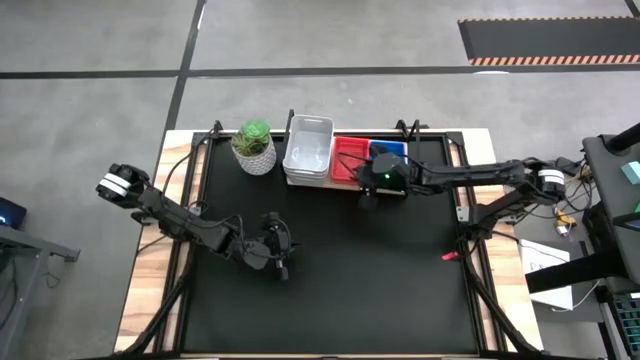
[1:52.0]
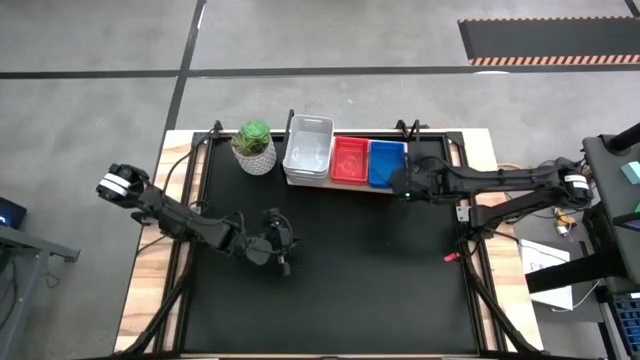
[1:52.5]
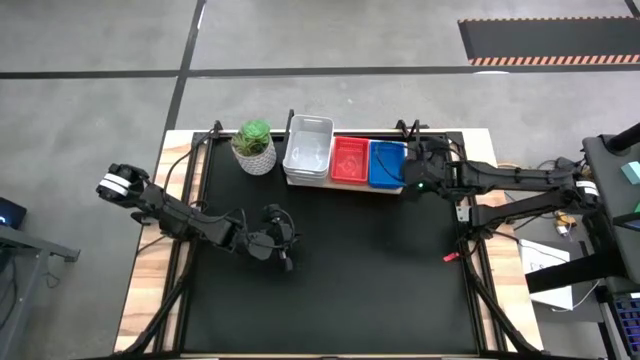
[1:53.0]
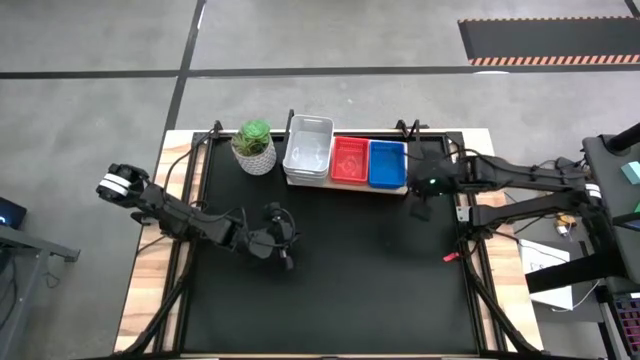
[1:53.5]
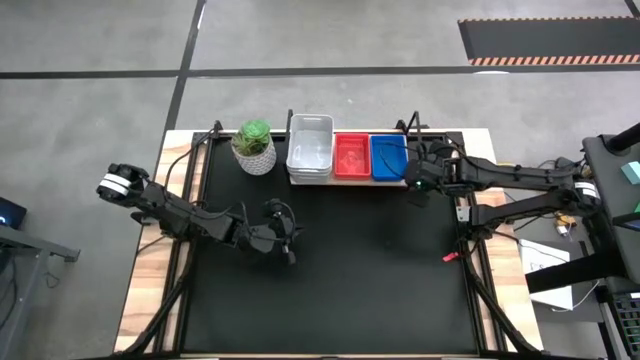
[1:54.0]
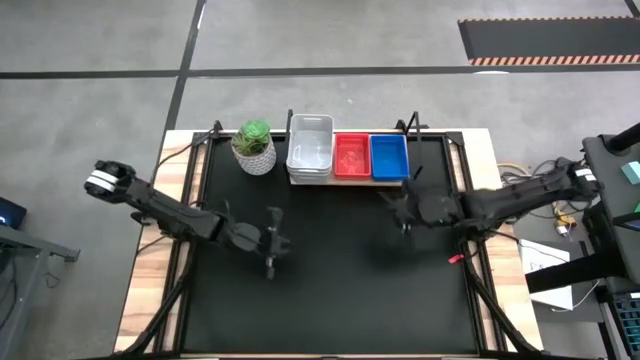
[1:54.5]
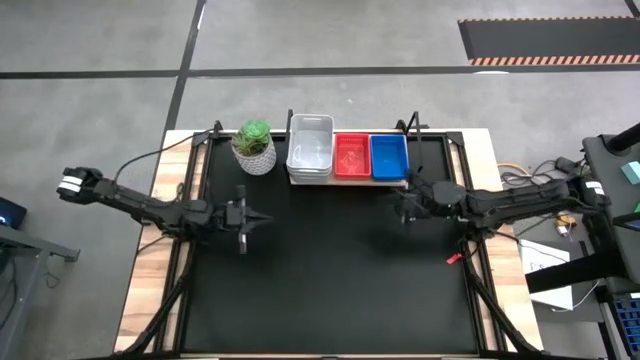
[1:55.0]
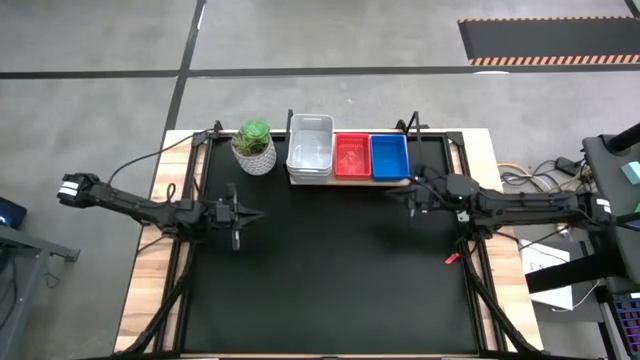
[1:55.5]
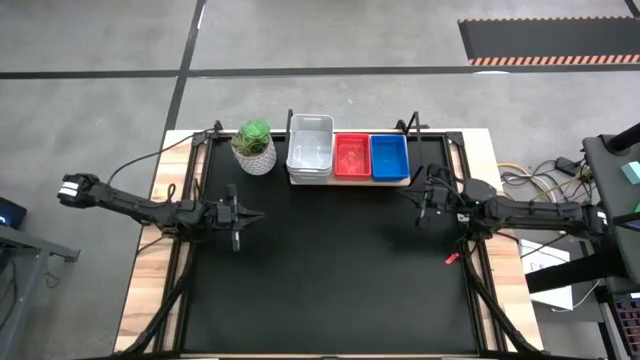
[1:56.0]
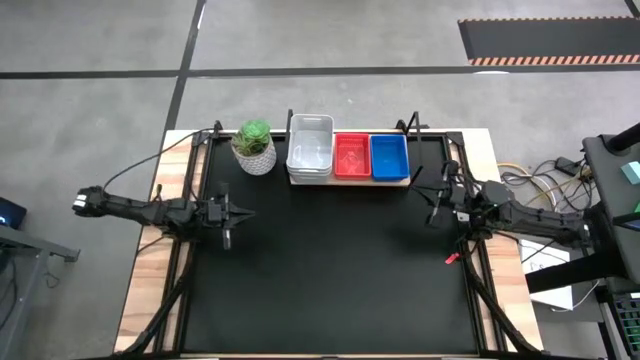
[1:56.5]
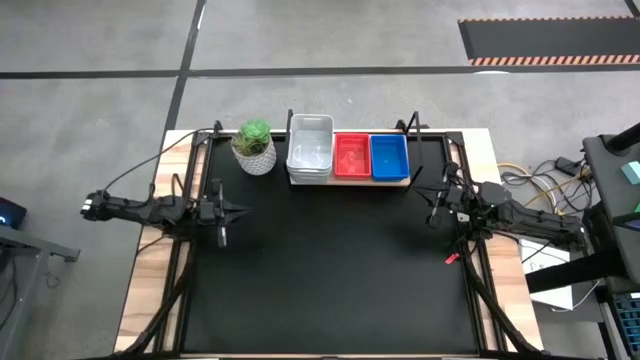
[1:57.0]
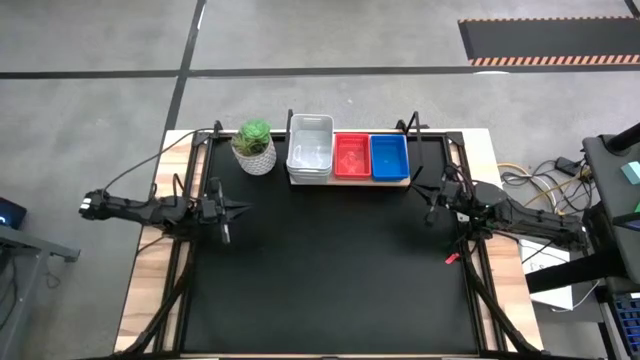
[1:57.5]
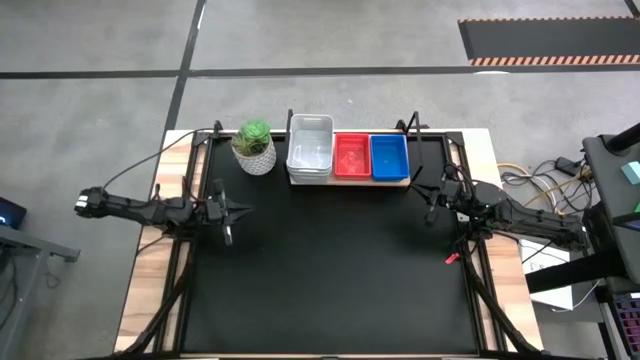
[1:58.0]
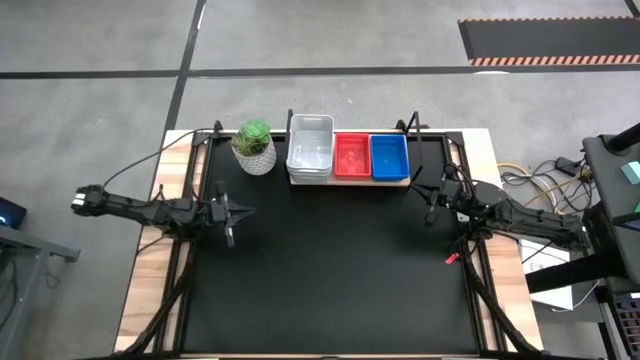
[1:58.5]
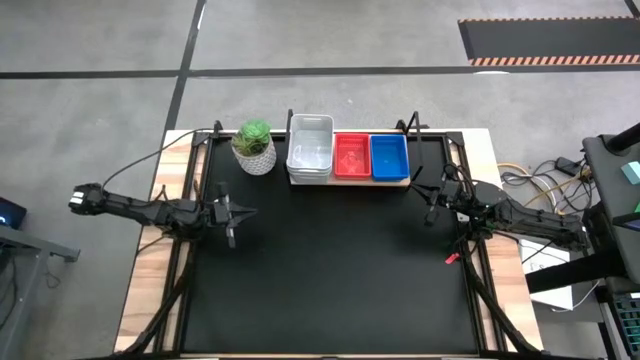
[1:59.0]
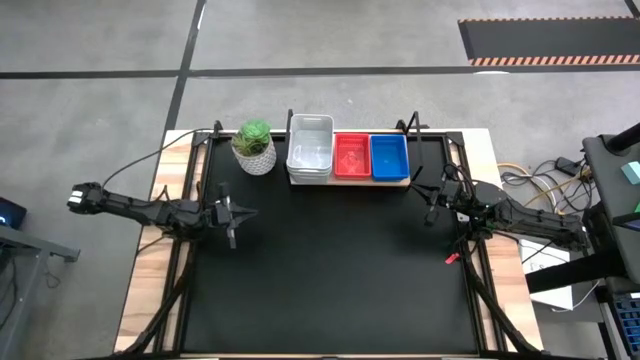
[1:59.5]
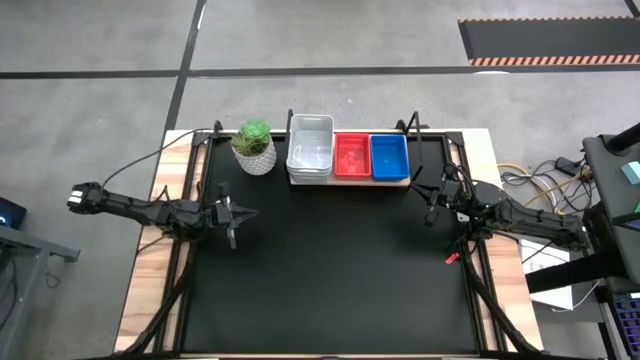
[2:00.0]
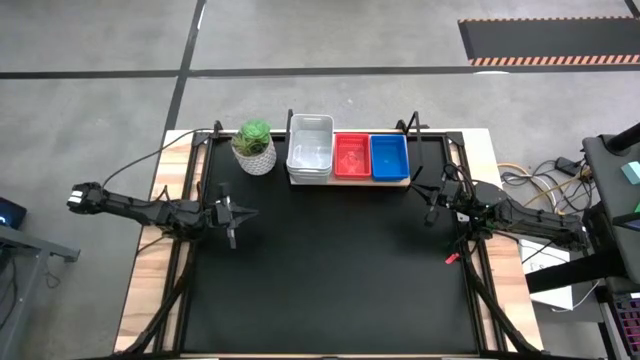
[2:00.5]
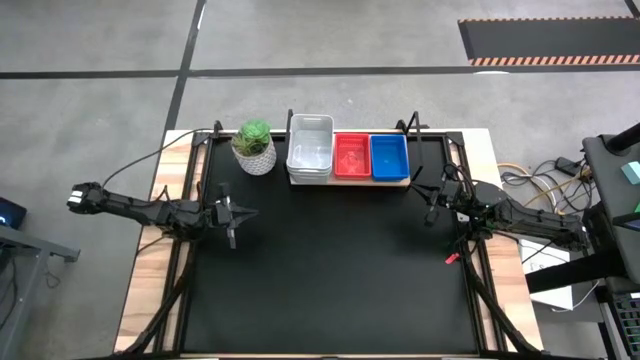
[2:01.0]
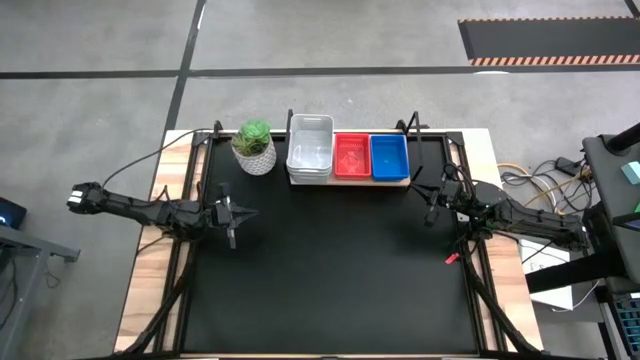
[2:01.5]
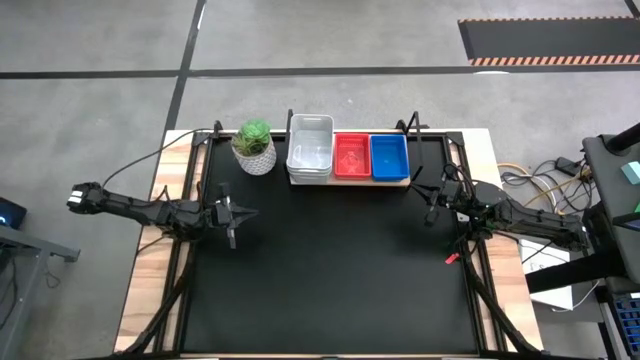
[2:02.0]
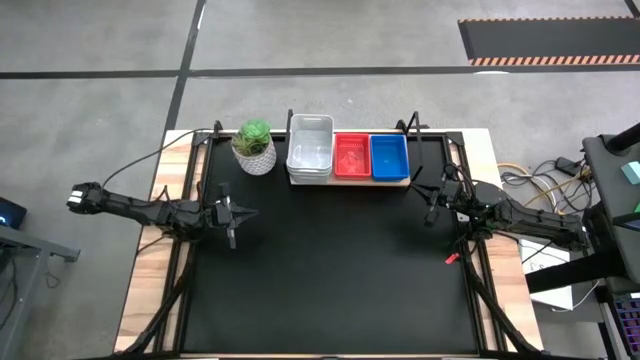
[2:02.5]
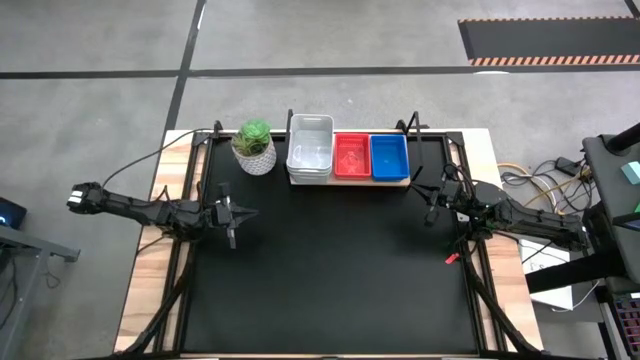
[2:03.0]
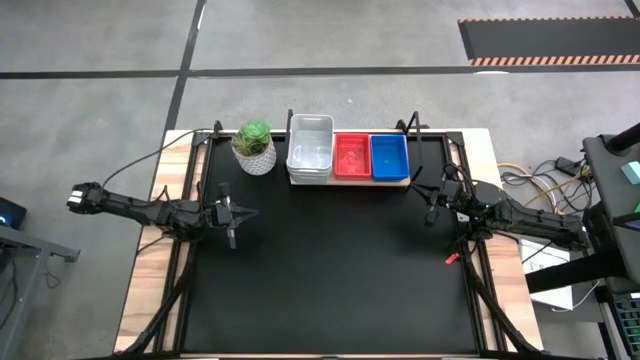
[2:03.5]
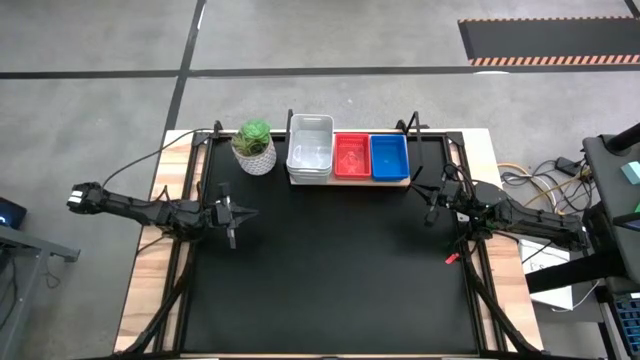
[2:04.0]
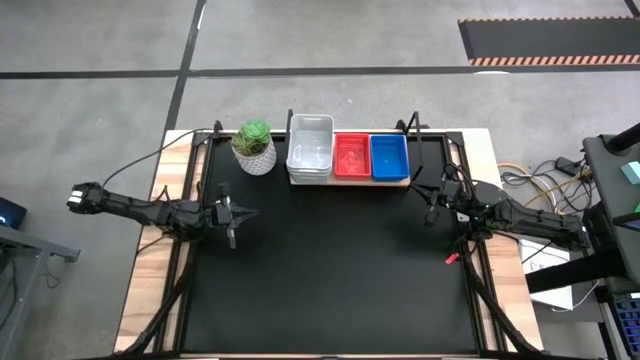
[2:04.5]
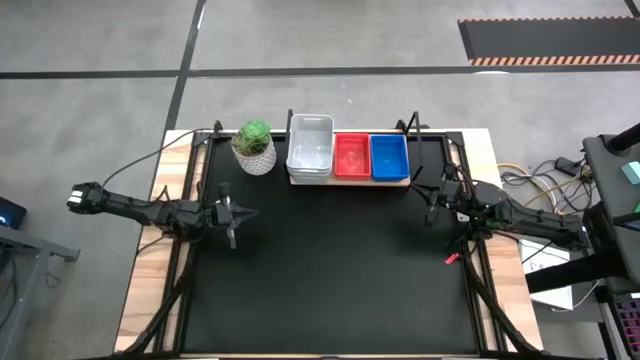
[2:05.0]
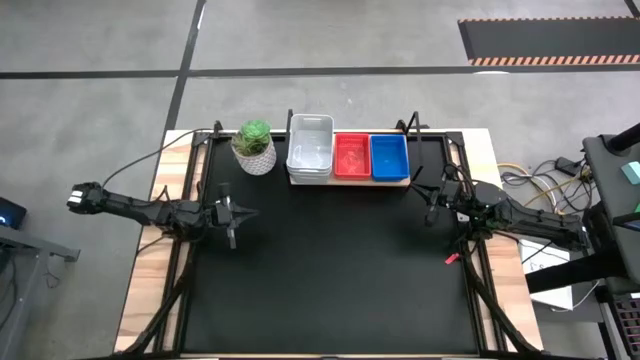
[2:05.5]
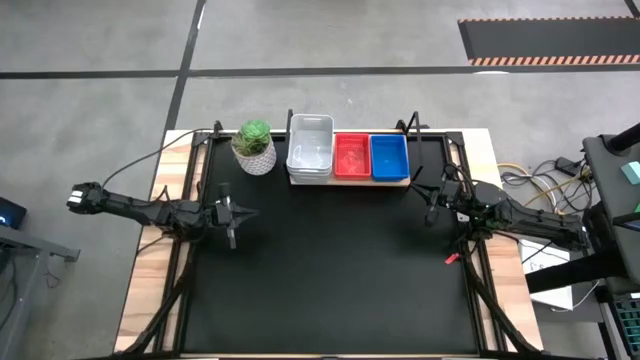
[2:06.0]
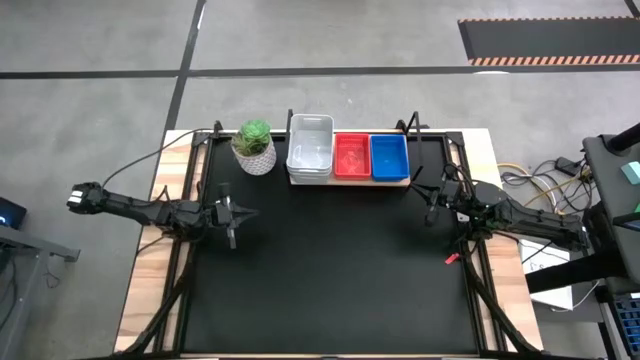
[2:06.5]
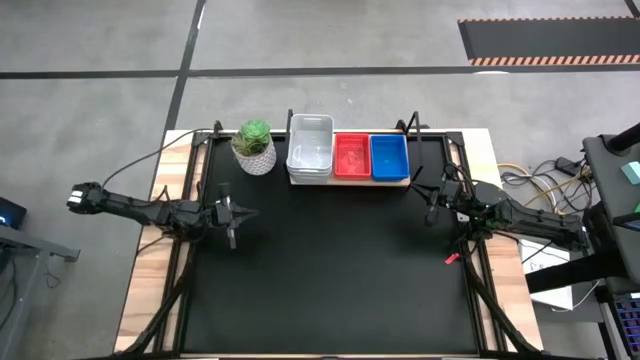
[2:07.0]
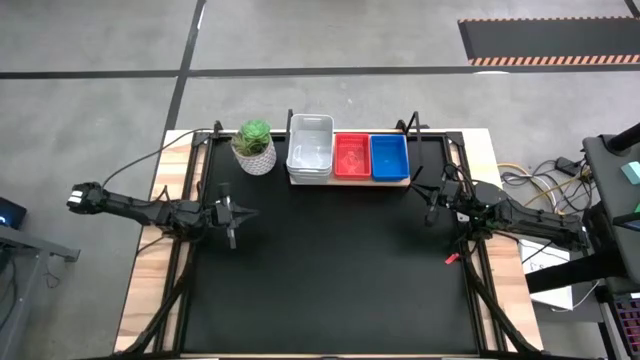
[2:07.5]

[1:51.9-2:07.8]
Task: Stack baskets on shelf by color
Return to Home Position

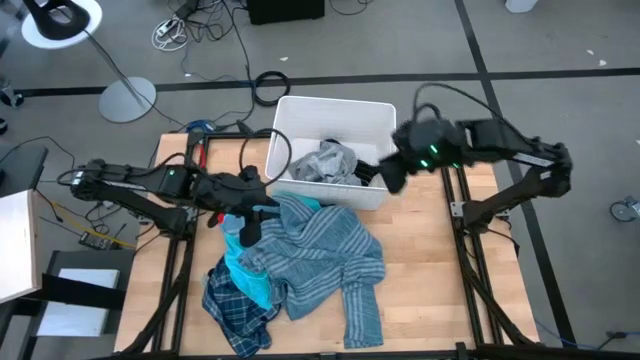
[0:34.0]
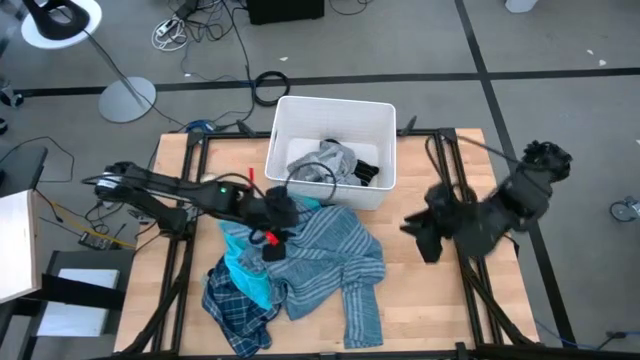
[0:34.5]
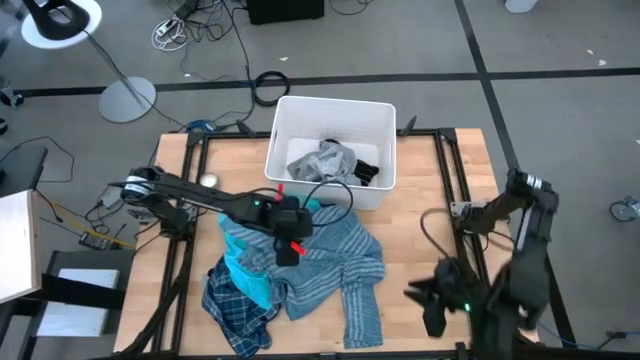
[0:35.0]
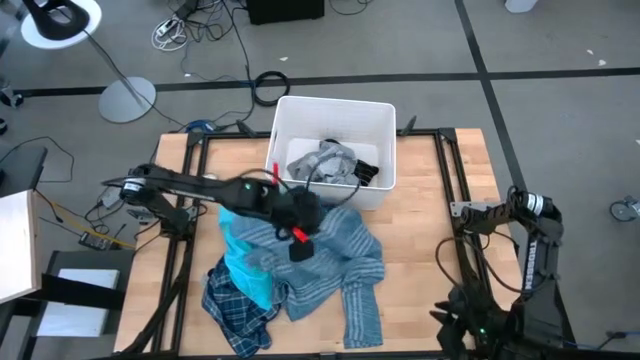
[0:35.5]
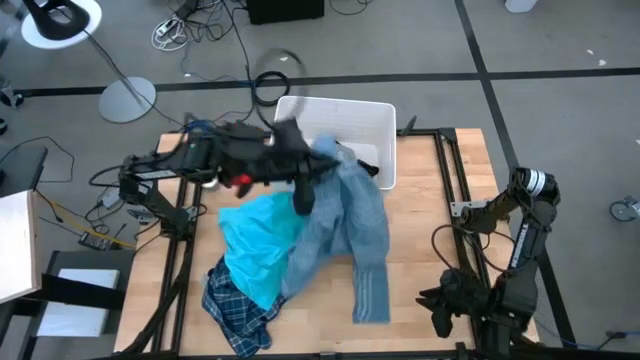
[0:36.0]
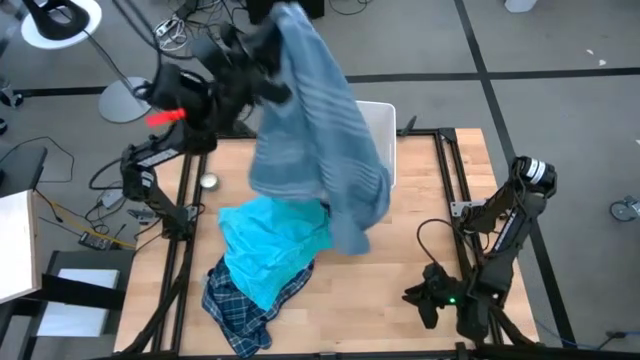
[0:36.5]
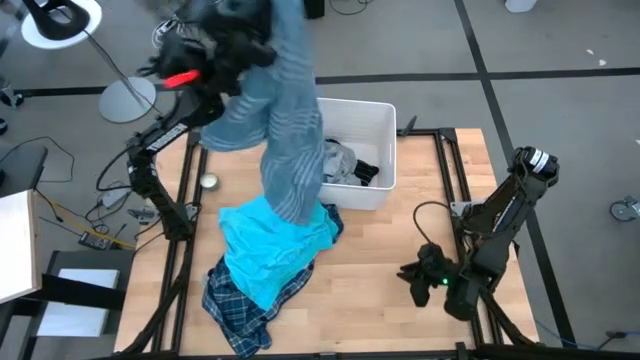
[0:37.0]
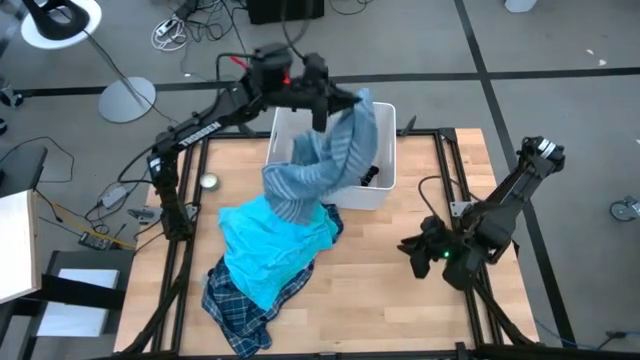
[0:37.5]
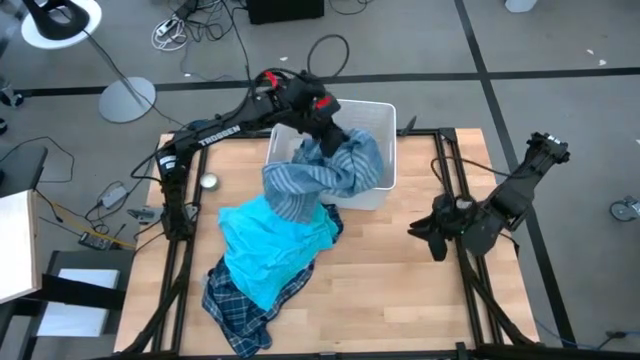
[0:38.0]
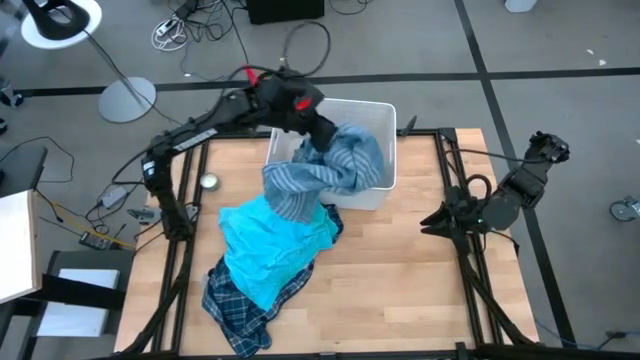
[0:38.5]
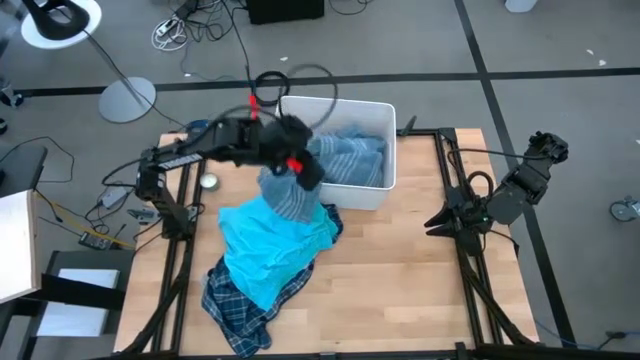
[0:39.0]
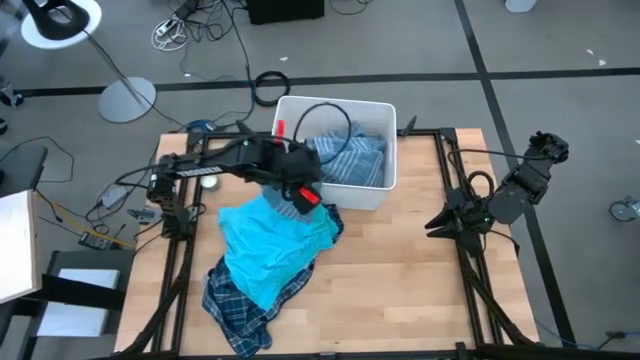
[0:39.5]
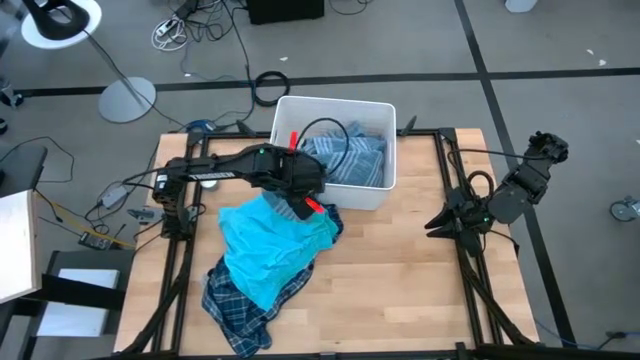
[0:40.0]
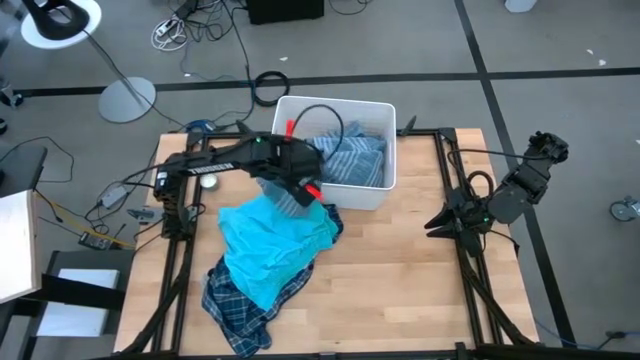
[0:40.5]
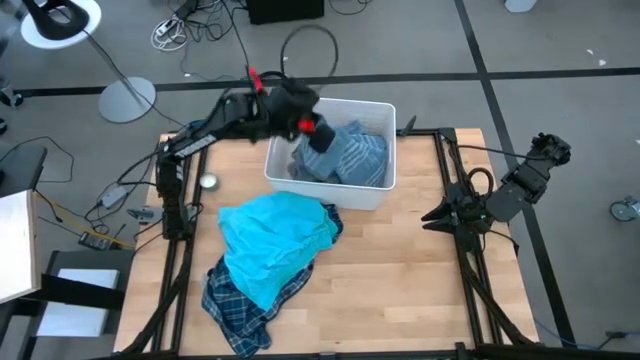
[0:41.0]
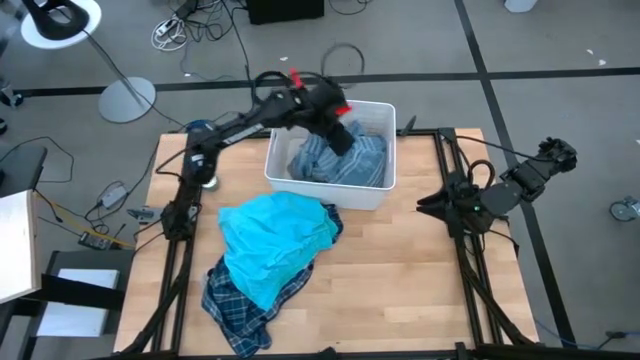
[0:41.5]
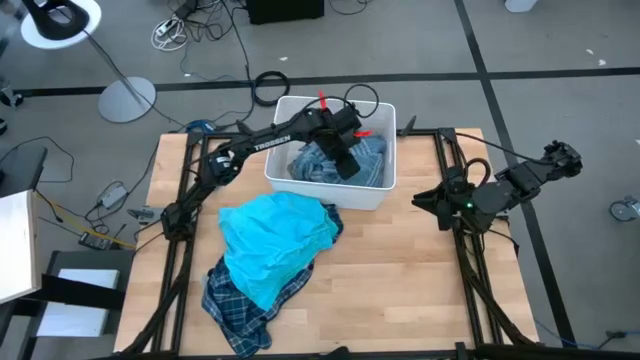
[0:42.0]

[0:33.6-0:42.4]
Task: Sort clothes
Put the light blue long sleeve into the white bin
